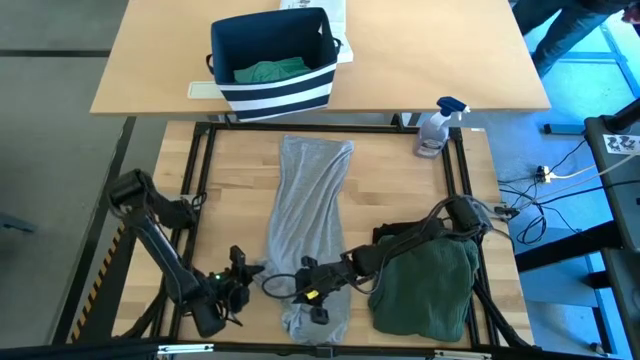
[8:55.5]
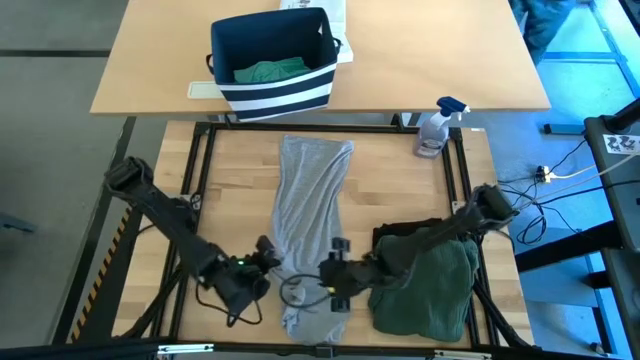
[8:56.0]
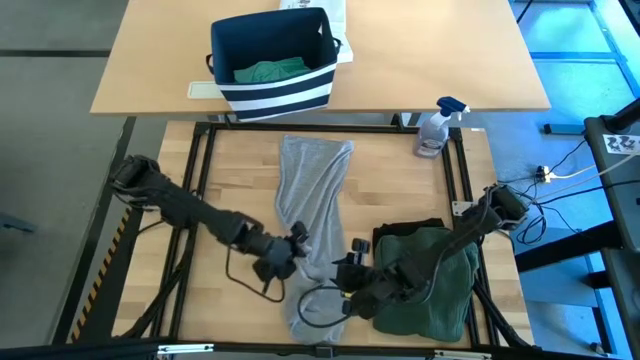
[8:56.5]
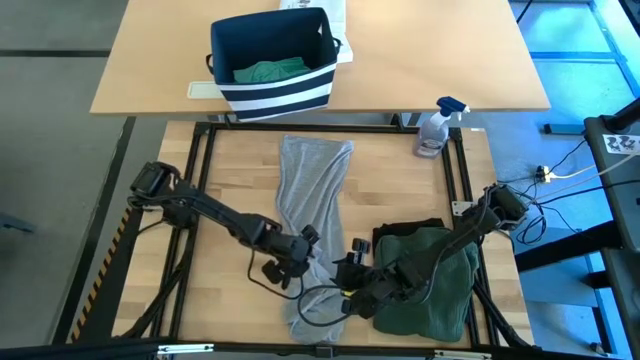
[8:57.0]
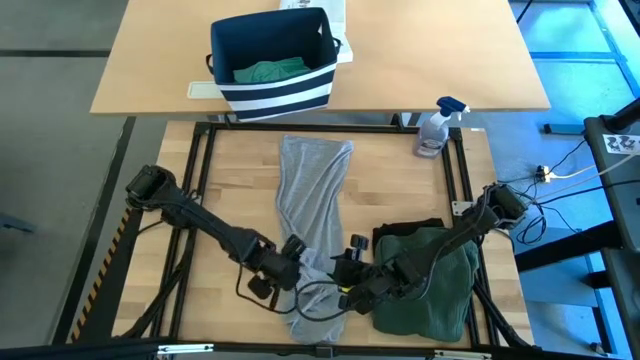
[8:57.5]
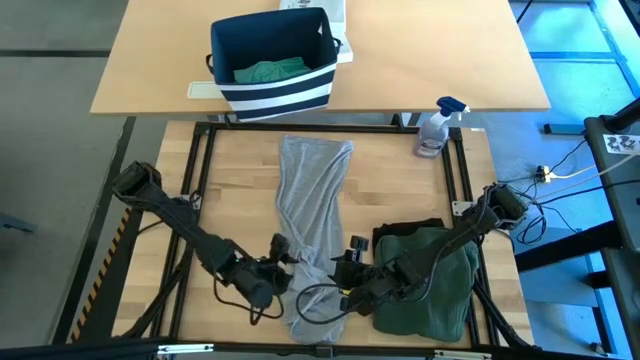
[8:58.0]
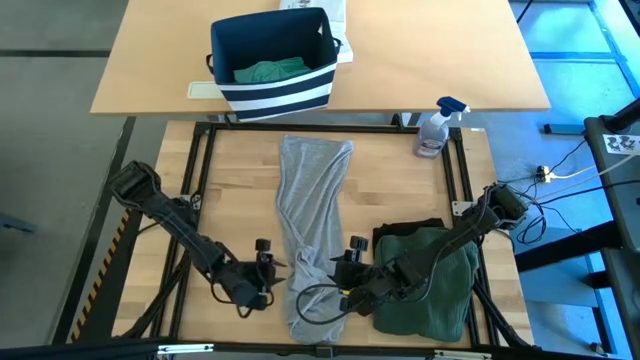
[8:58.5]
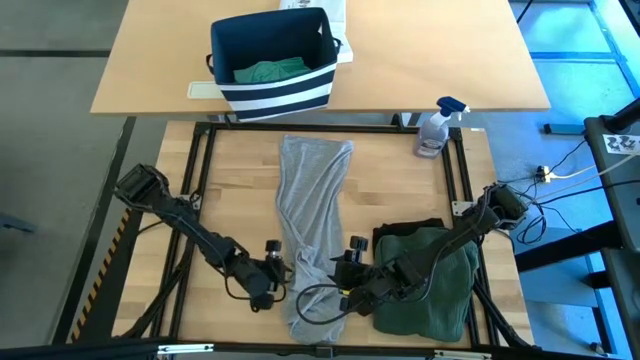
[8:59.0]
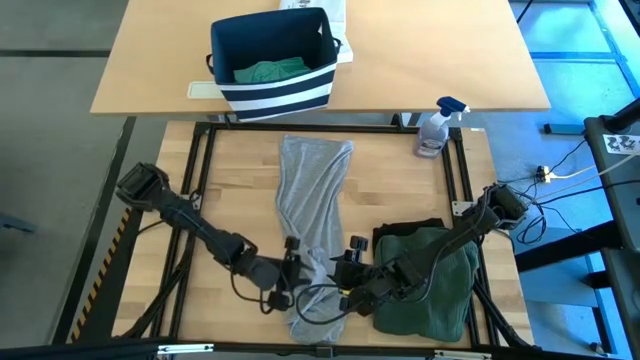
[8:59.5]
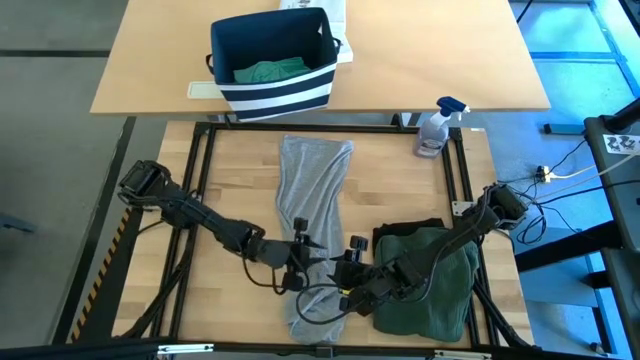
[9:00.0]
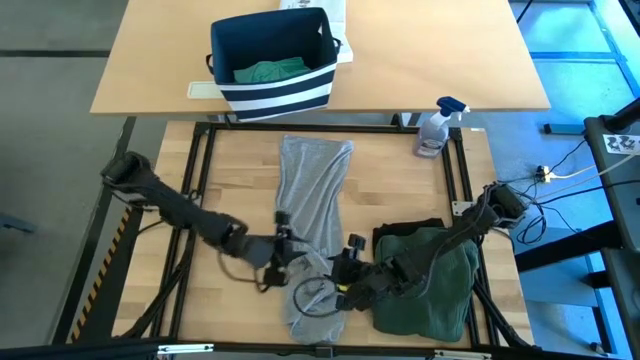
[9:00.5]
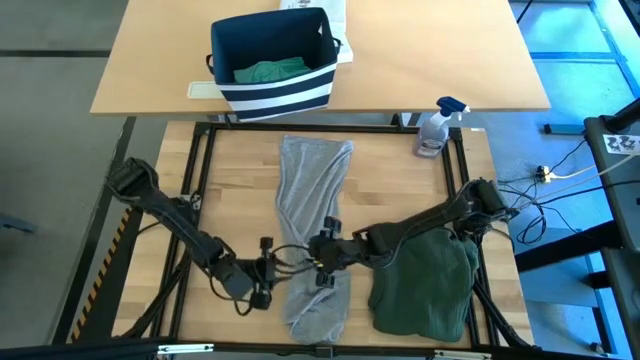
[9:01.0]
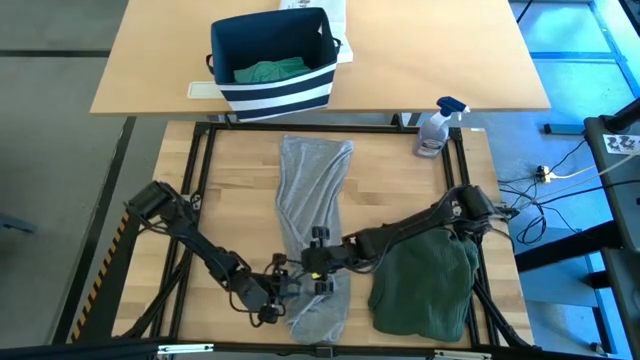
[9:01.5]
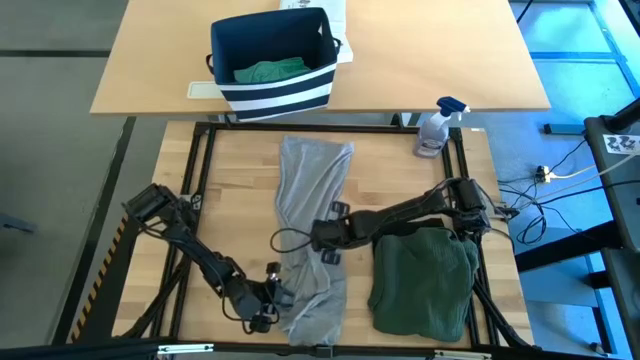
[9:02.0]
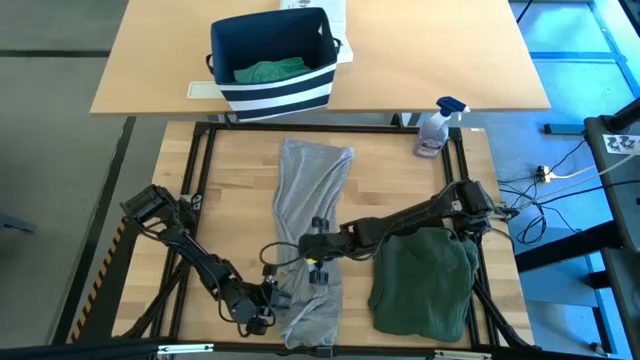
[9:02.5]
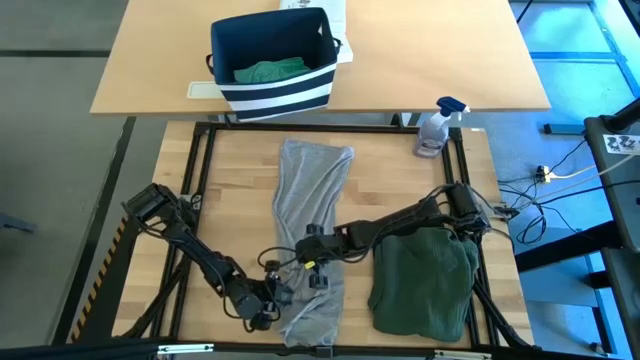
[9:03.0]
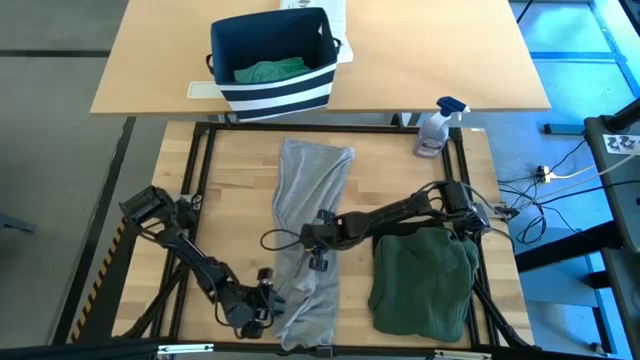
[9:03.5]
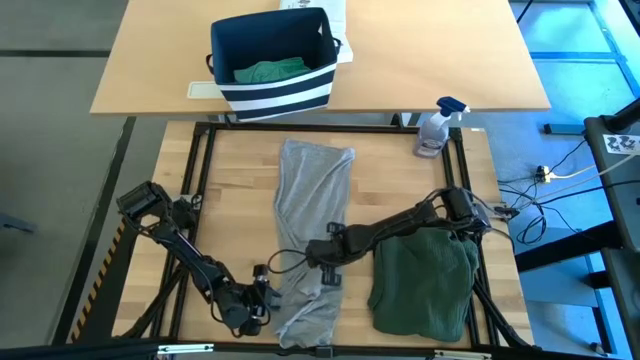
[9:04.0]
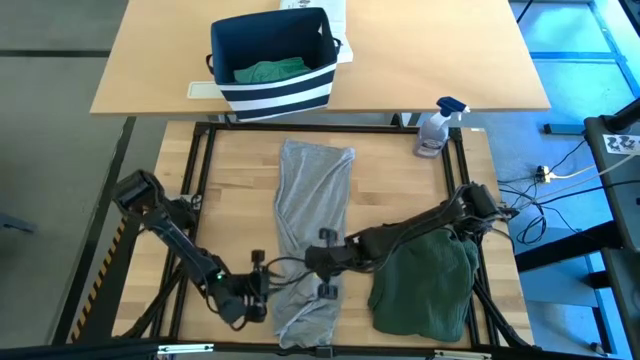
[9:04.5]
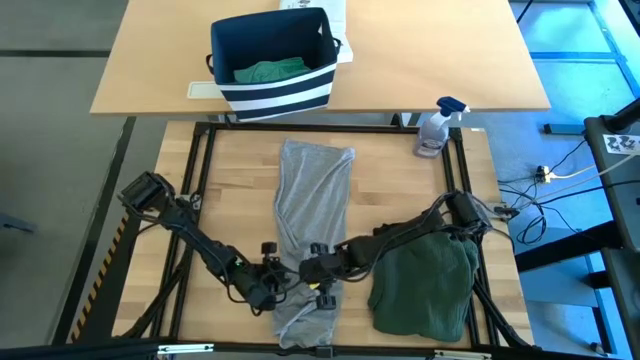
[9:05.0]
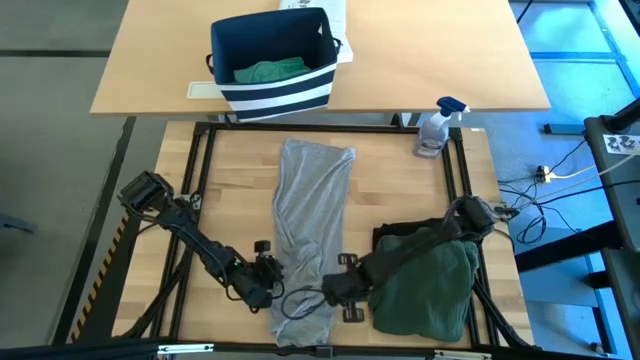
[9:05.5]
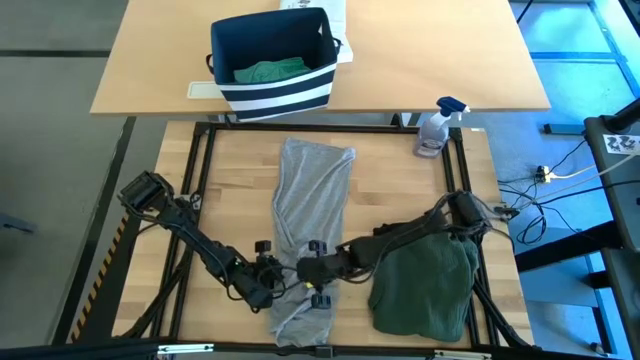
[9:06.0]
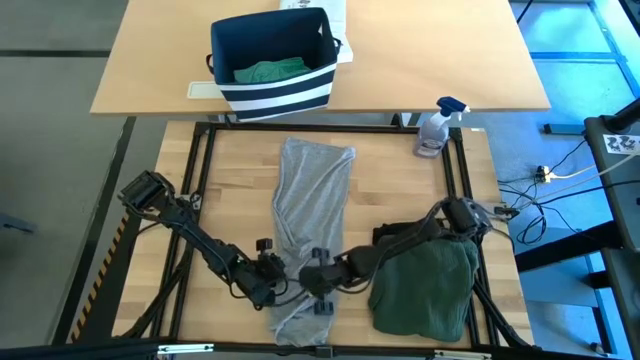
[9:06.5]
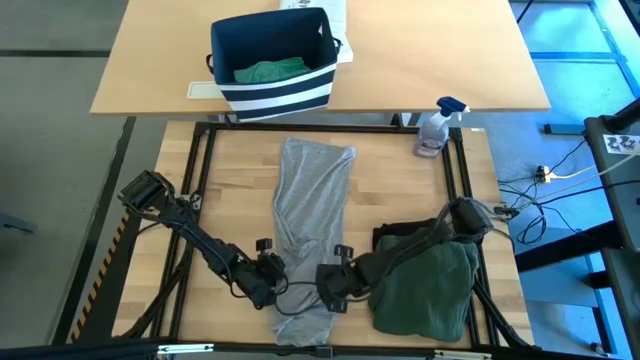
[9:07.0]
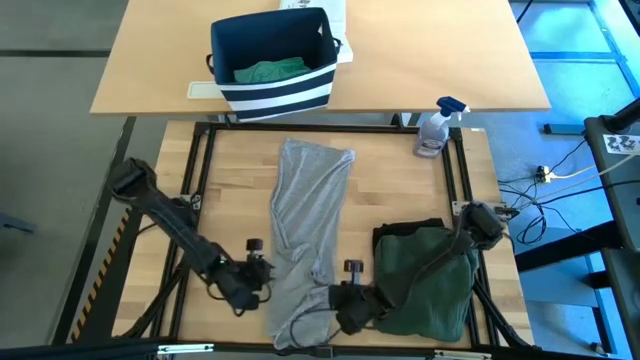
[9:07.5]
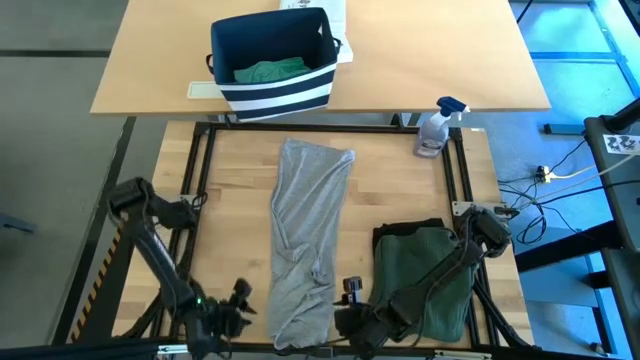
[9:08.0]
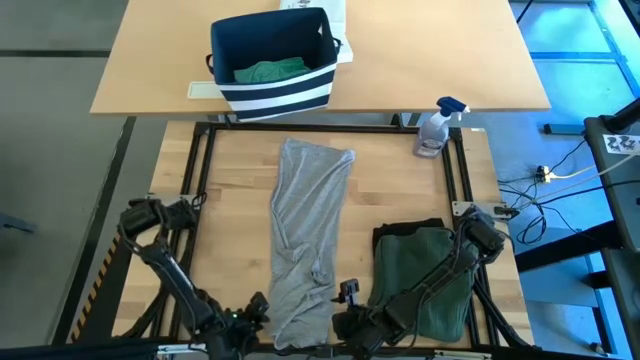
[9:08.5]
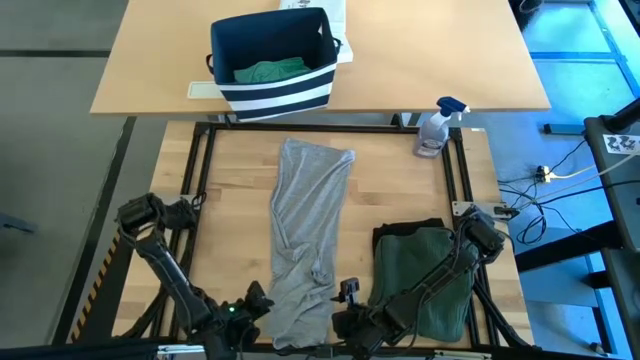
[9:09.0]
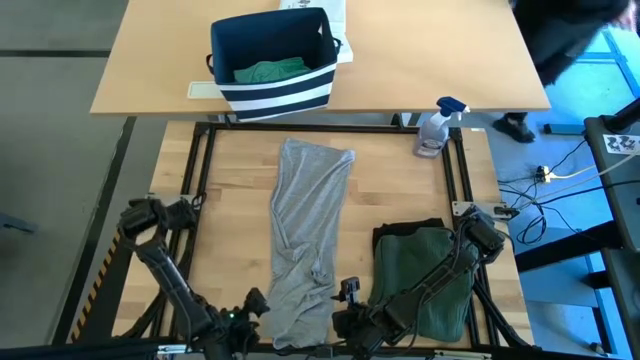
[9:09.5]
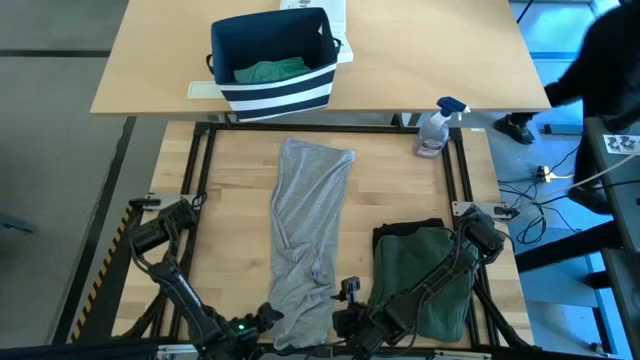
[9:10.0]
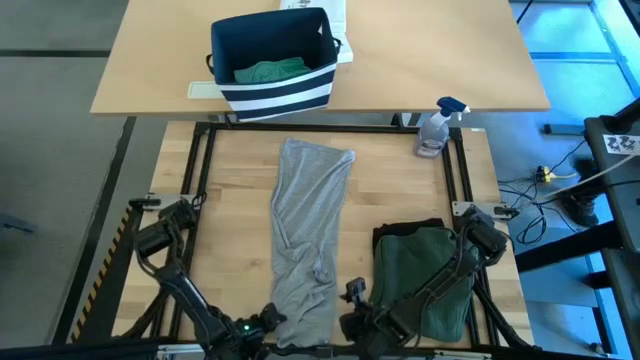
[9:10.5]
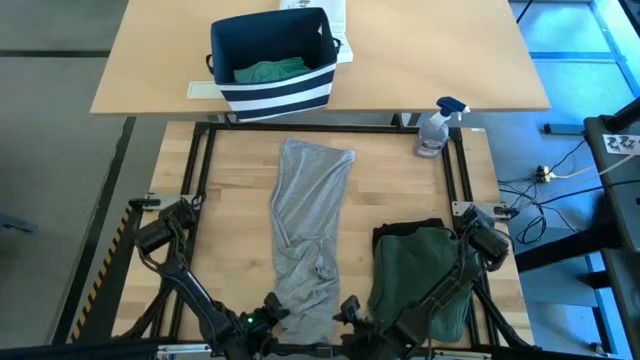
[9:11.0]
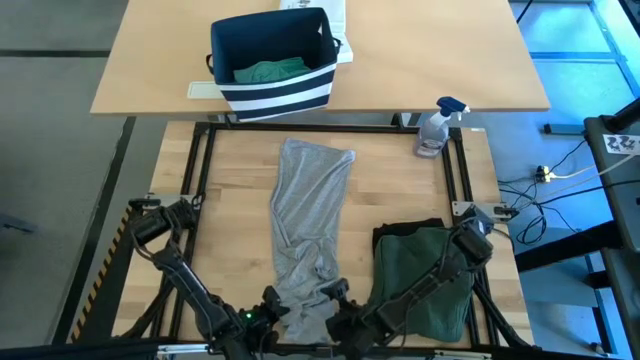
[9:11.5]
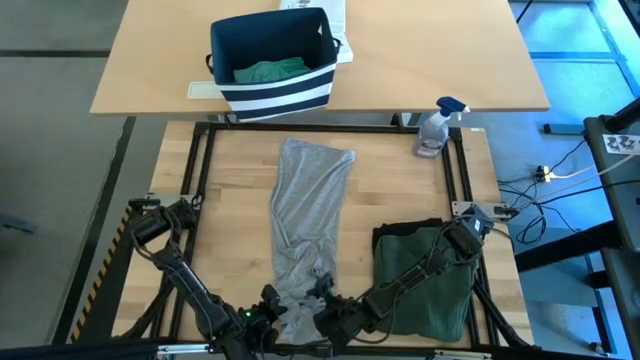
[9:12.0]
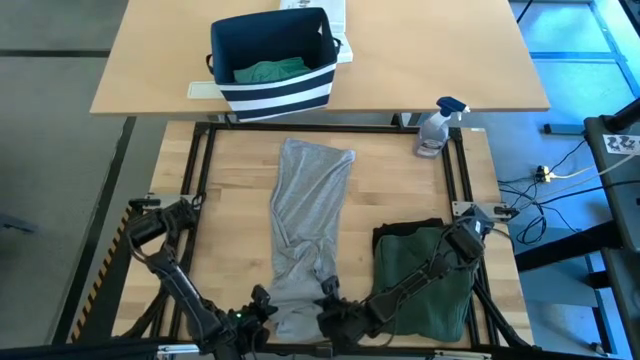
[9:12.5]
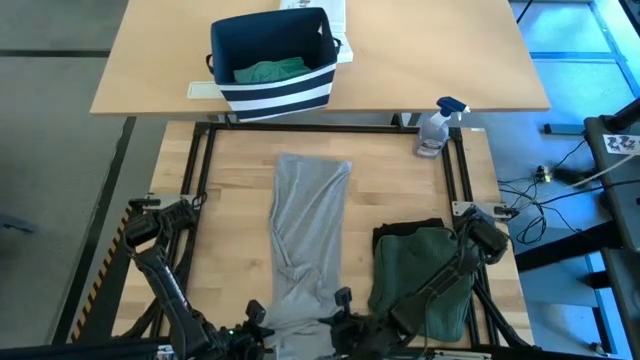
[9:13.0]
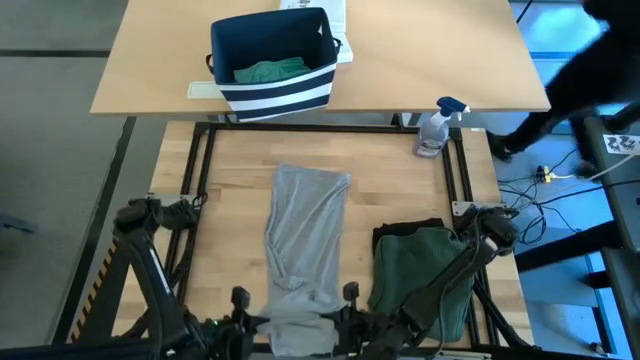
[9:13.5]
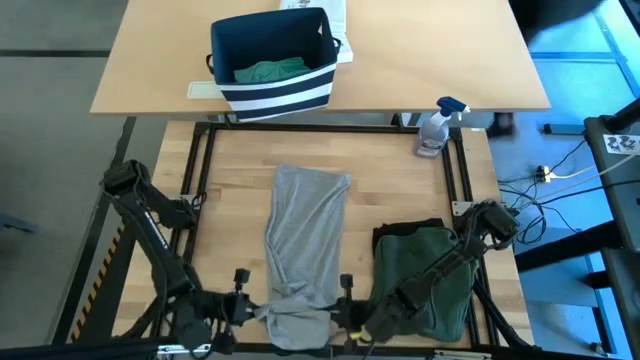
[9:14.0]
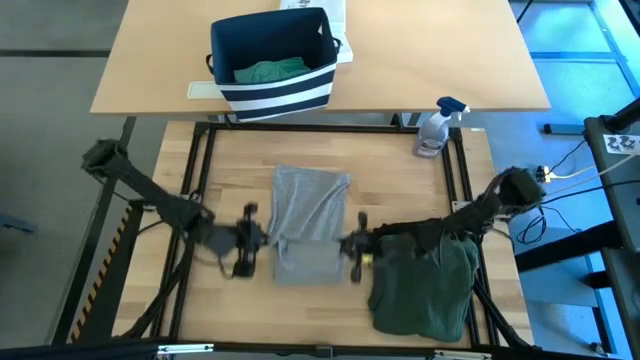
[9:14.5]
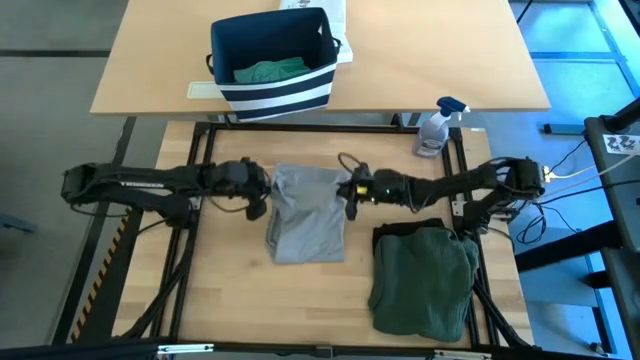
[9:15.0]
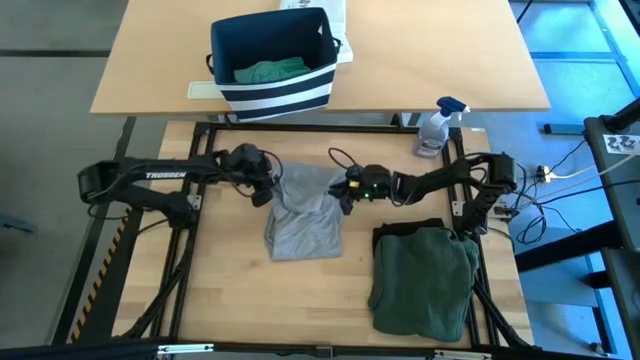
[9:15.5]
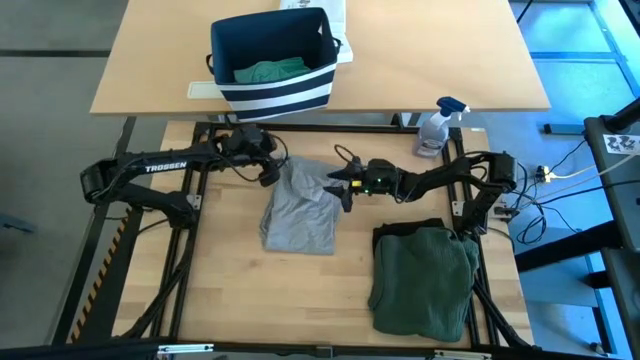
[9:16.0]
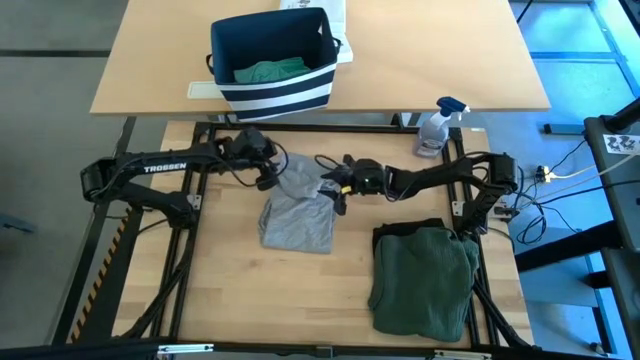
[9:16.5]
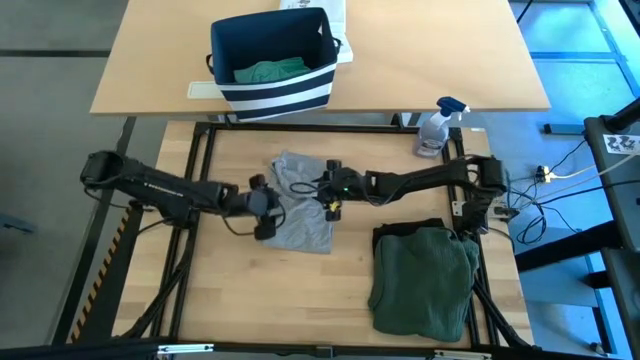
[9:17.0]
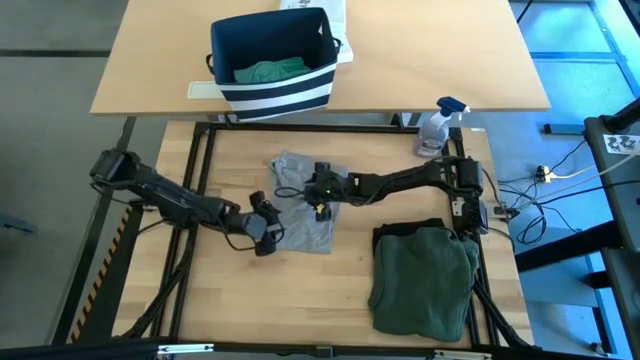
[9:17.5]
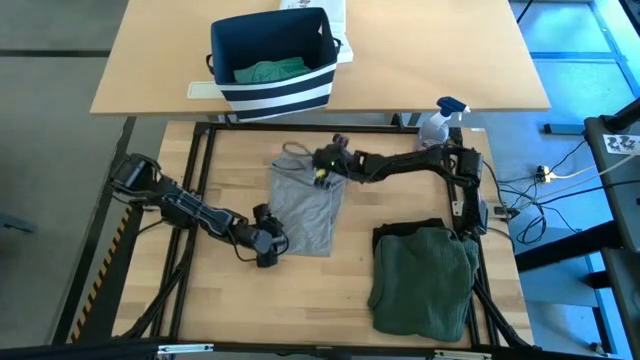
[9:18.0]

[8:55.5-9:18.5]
Task: Fold Laundry from Bin
Fold the gray shirt
